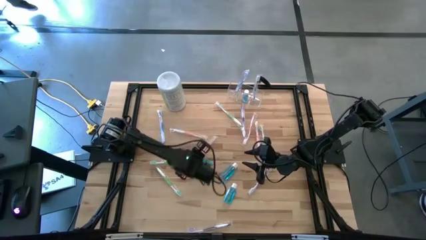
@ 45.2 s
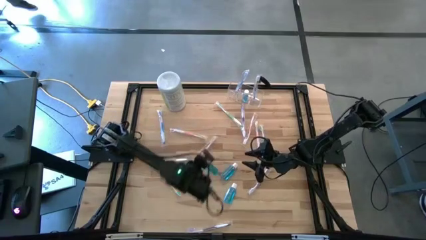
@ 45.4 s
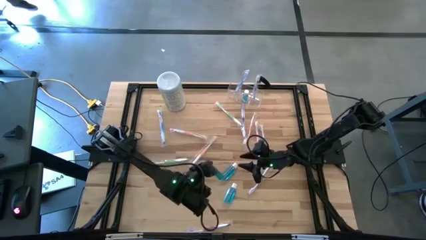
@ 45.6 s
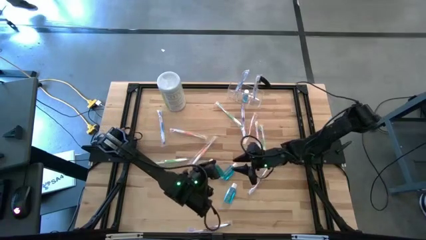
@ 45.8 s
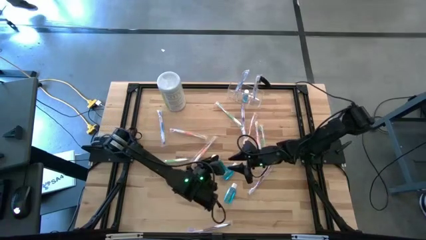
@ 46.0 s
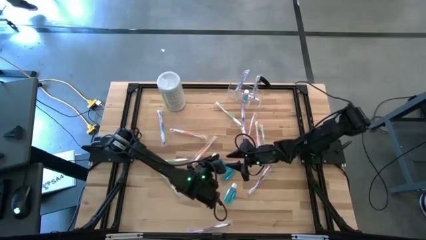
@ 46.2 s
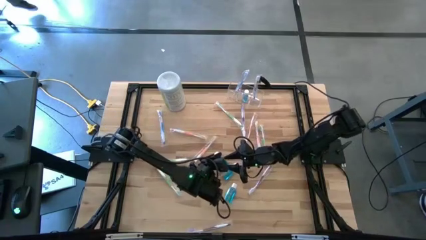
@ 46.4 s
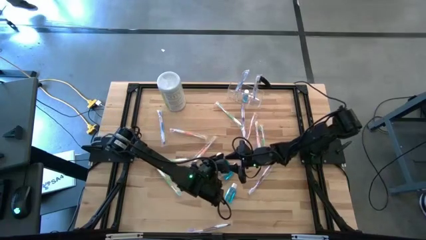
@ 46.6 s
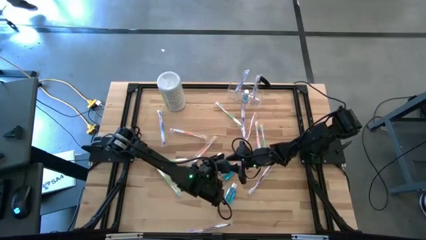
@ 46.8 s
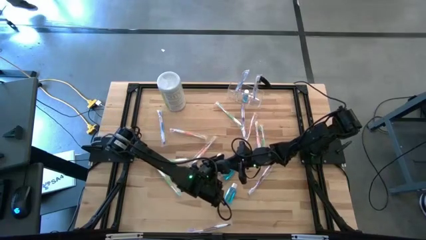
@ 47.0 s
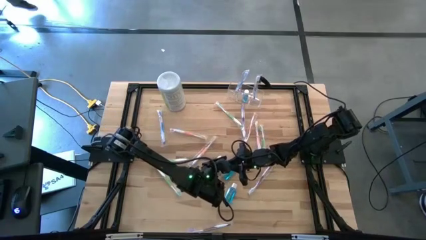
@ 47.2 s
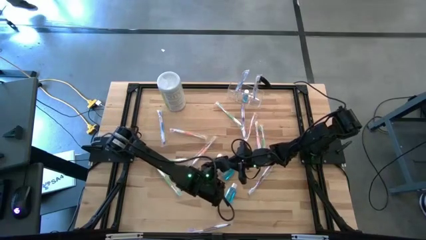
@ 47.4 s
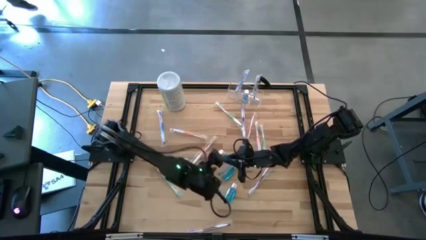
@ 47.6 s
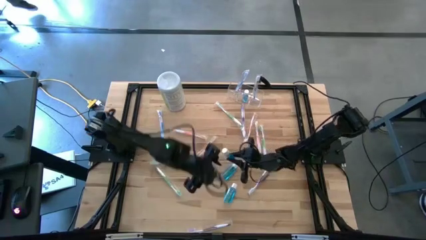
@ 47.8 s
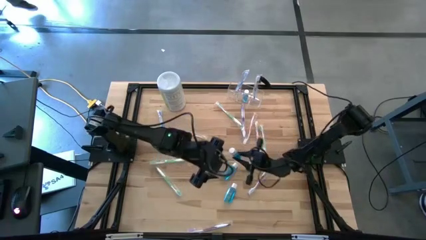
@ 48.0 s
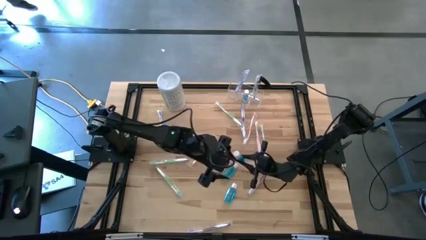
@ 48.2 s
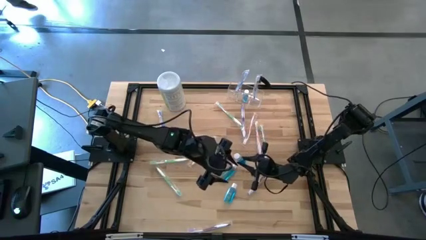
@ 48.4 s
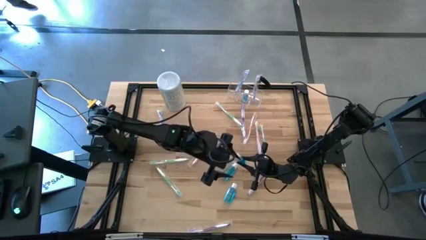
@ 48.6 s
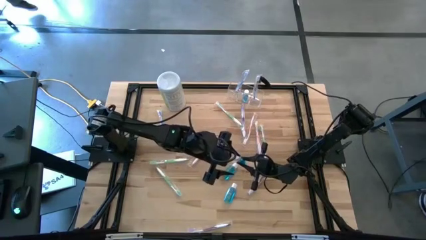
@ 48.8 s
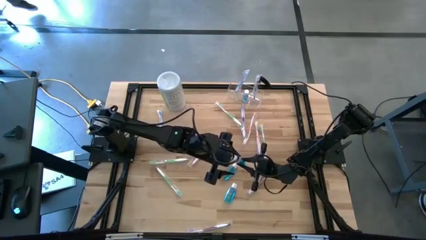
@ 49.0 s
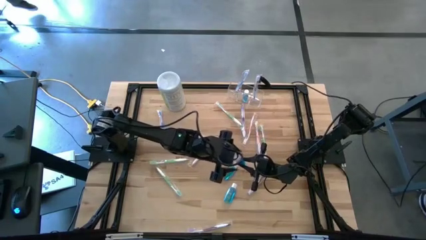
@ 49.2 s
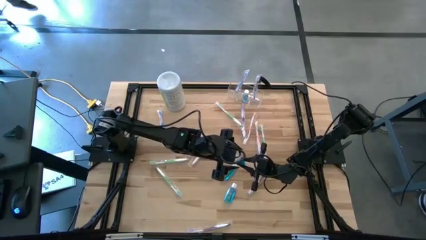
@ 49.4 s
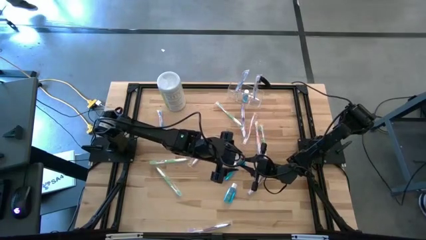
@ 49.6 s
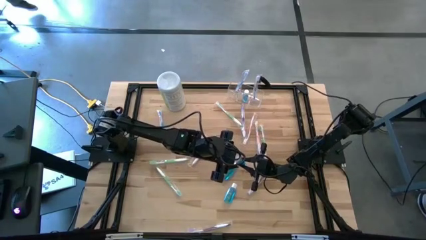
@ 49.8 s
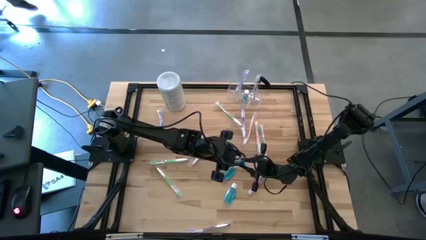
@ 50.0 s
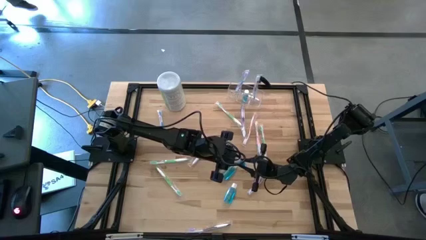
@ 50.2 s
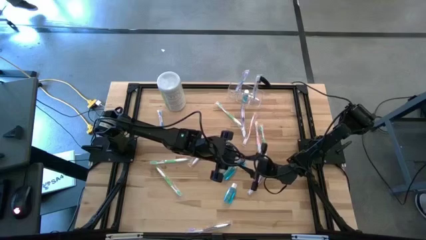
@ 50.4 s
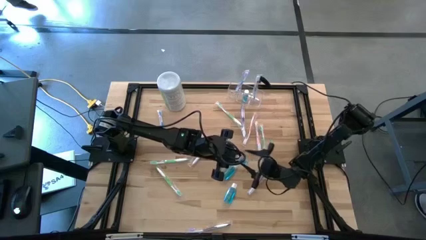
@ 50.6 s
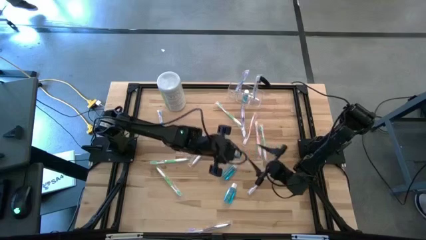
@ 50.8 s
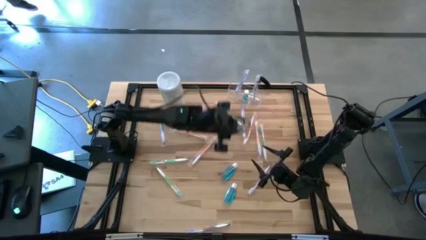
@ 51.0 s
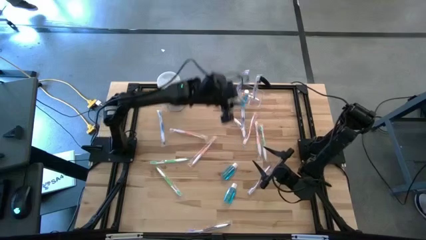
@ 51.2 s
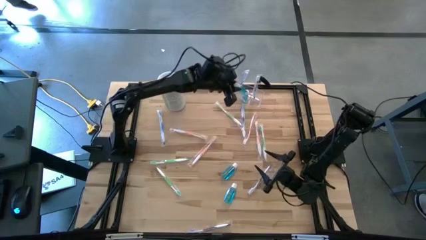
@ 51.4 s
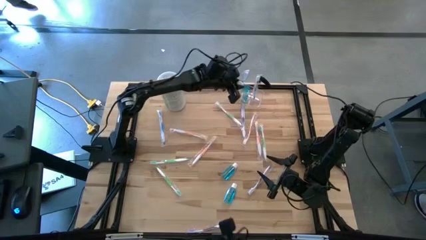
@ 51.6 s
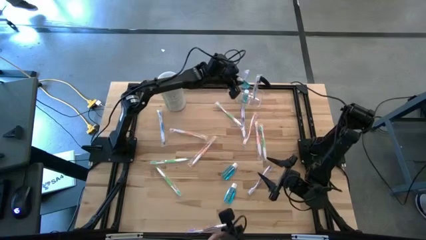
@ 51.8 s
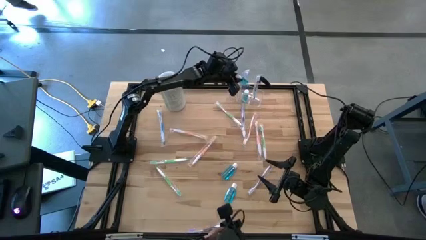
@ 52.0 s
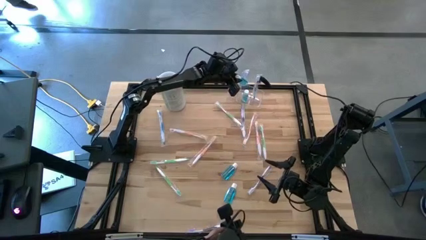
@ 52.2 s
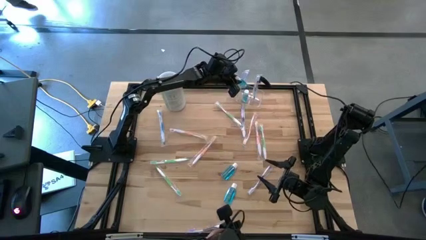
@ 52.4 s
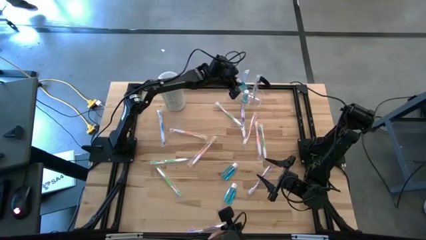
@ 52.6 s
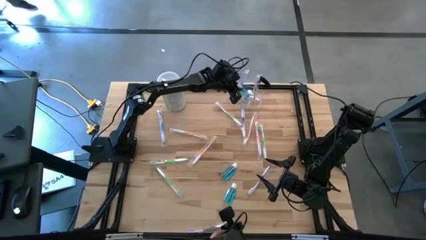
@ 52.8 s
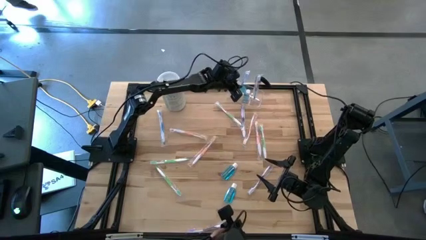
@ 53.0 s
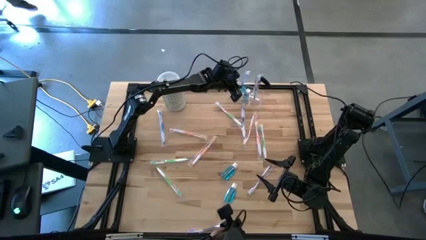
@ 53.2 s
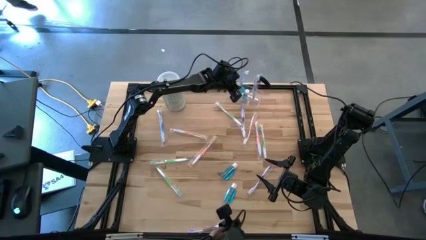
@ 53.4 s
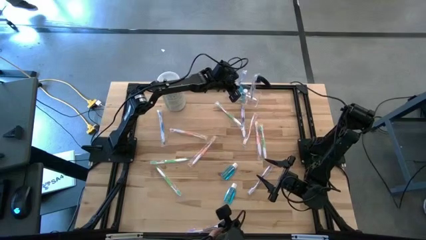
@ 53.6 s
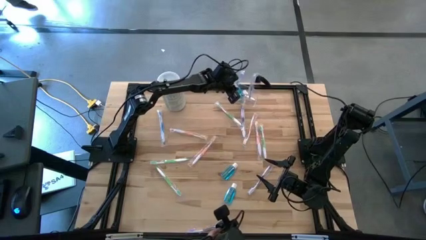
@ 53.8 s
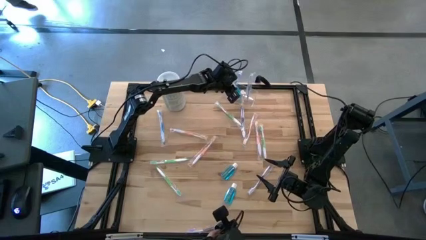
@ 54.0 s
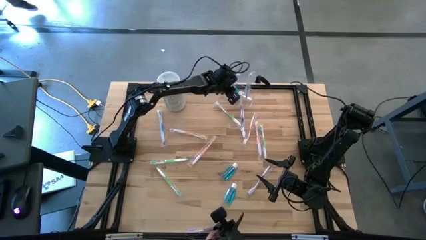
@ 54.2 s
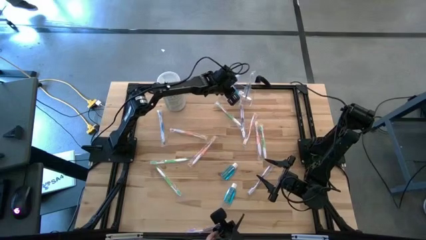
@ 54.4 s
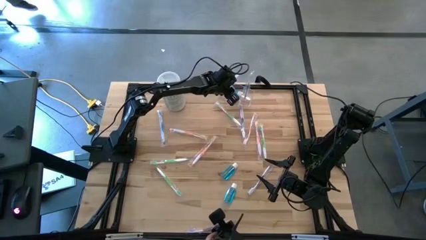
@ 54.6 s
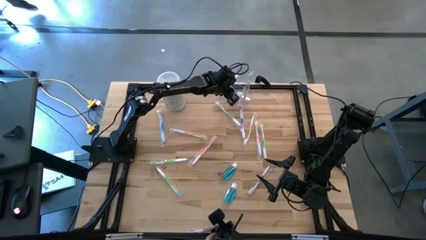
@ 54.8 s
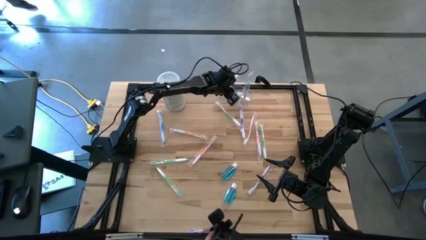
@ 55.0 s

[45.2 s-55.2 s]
Task: Pick & Place toothbrushing station
Put the blue mouthwash into the transparent organizer

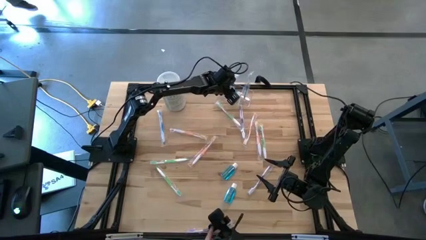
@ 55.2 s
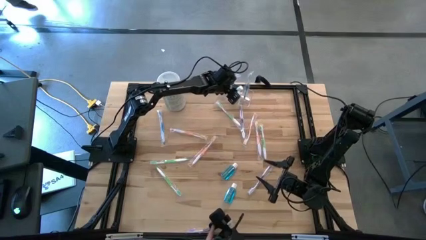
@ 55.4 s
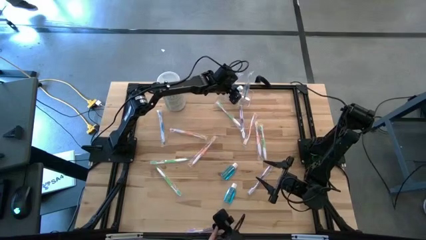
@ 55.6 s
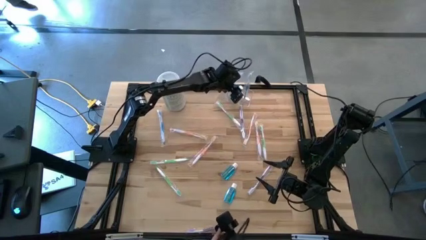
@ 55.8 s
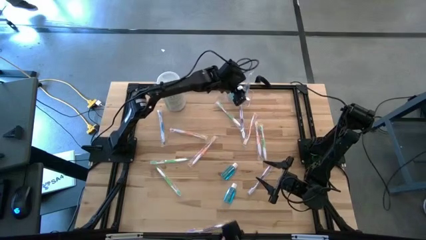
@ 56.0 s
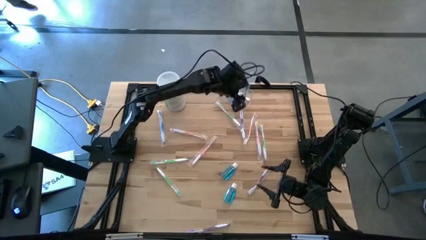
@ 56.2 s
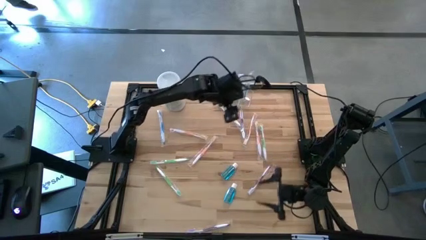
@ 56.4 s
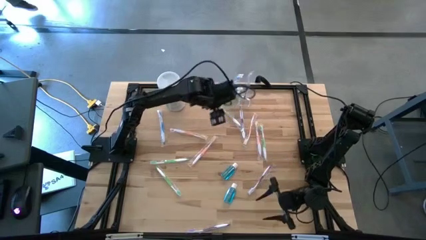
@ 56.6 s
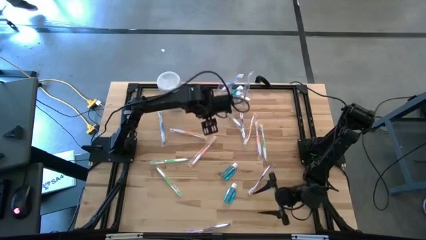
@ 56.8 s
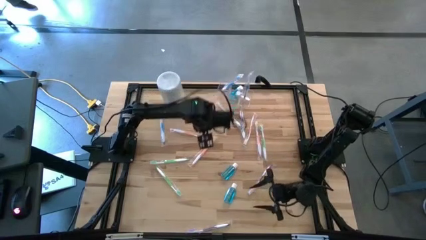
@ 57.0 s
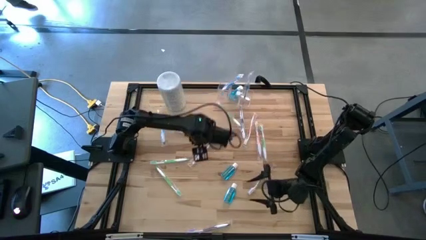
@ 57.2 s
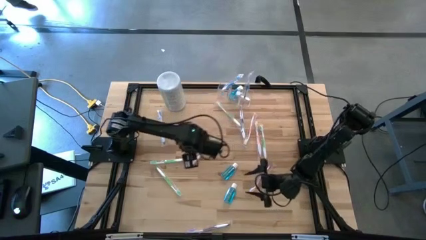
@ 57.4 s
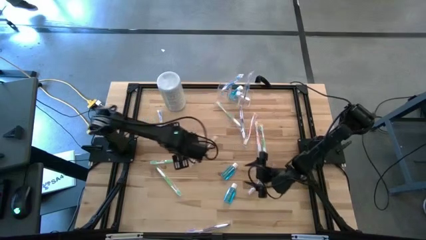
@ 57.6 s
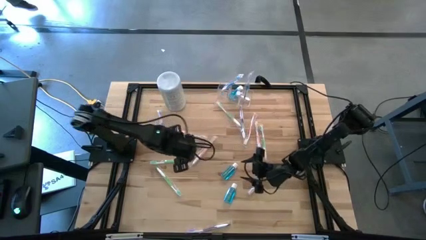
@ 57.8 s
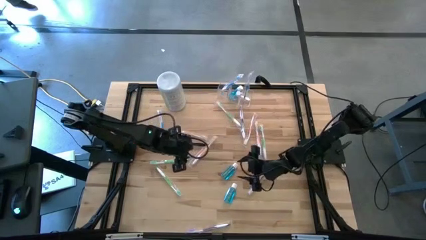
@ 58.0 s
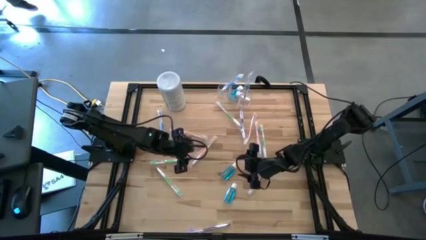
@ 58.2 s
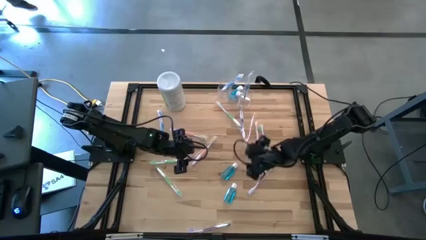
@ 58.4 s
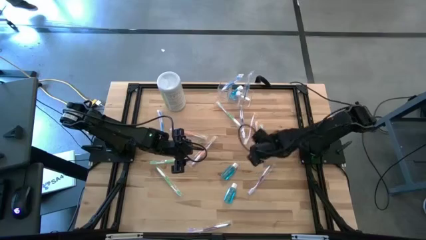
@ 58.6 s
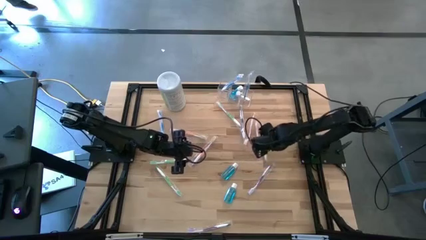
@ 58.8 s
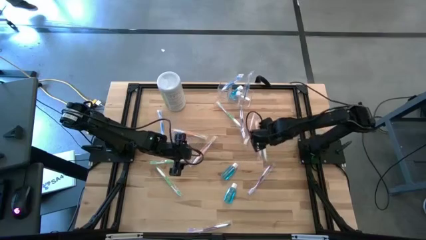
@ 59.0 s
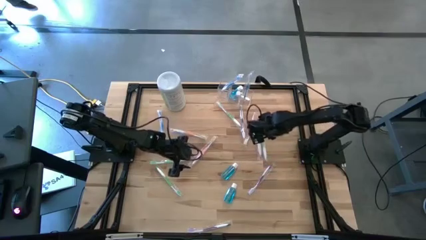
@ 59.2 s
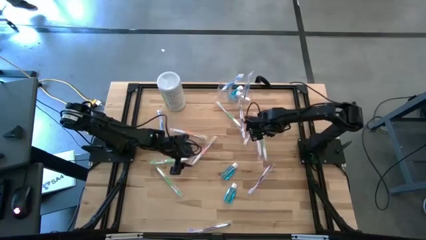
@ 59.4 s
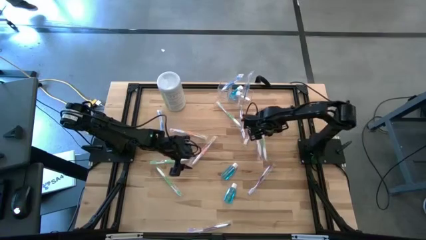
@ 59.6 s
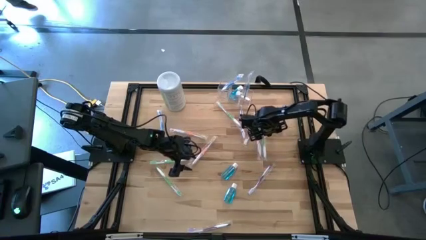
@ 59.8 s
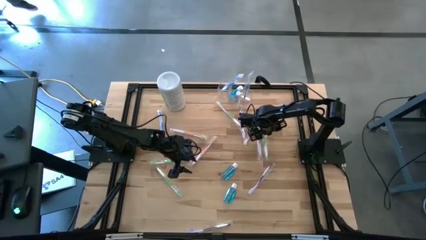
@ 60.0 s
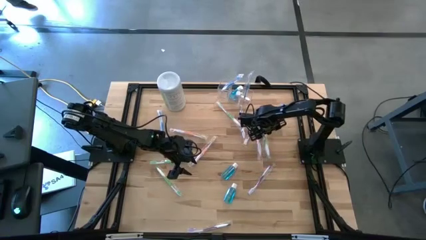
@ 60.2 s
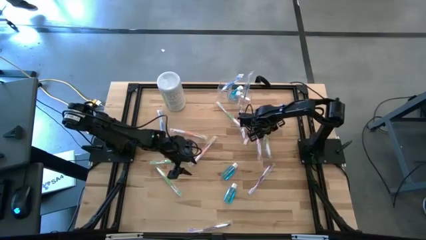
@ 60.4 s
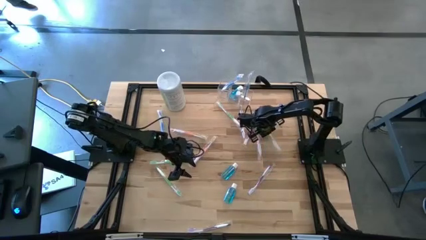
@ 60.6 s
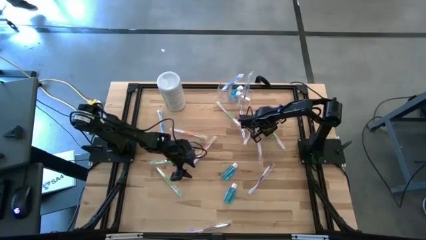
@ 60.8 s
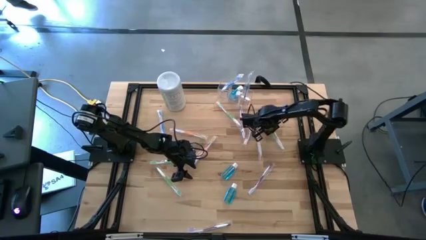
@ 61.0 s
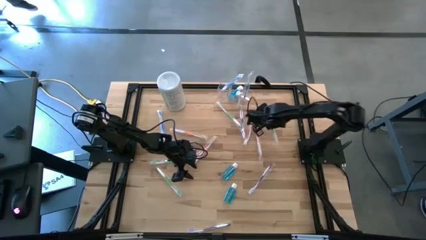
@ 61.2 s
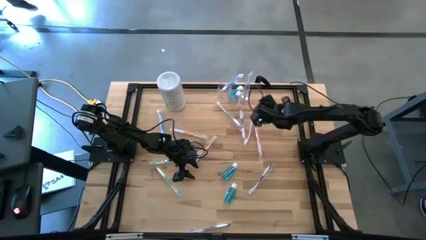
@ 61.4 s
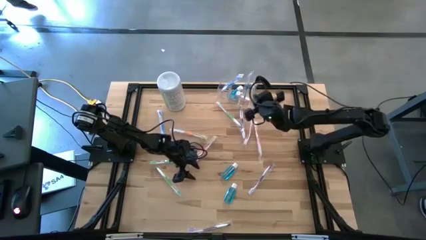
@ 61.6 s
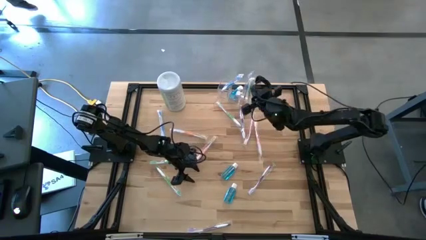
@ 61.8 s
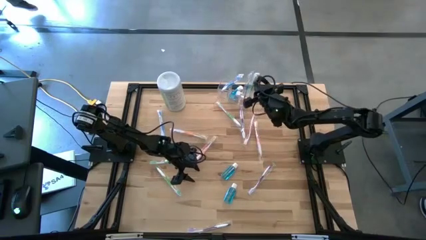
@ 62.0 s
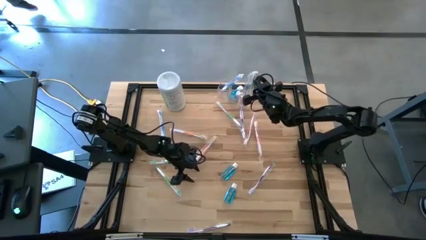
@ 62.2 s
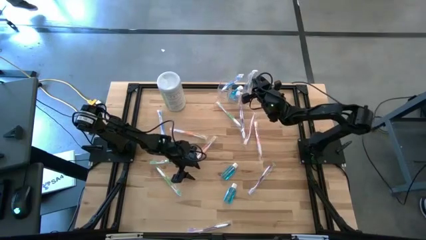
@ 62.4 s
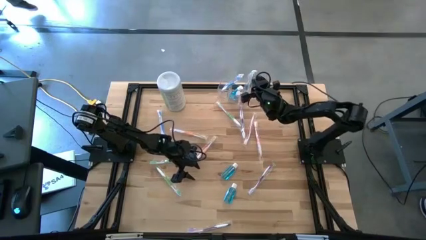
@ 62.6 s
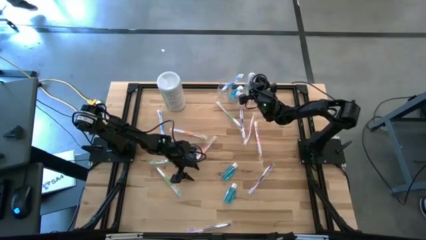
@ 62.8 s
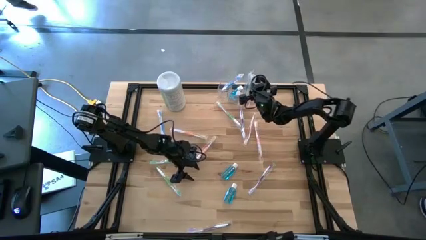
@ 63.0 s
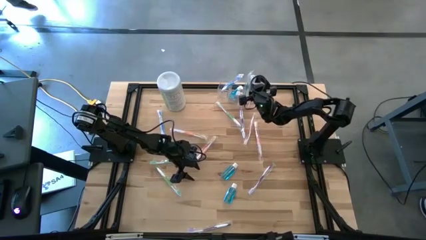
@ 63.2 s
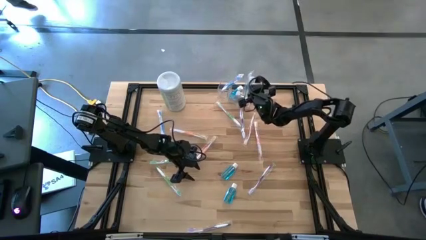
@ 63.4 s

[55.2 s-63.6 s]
Put the green toothbrush into the transparent organizer
